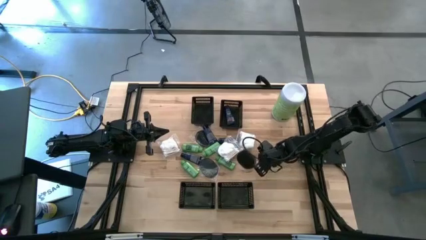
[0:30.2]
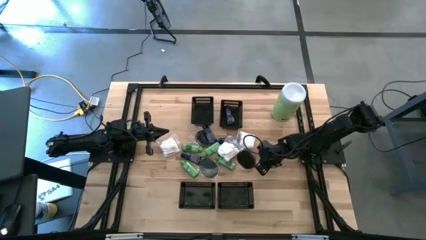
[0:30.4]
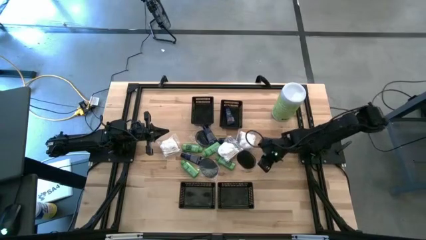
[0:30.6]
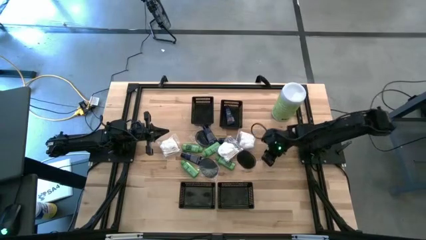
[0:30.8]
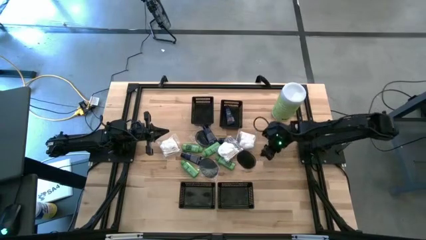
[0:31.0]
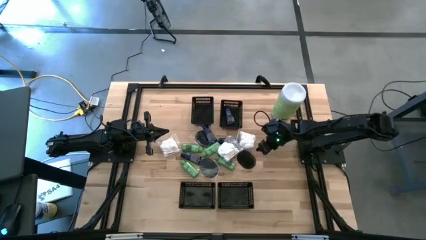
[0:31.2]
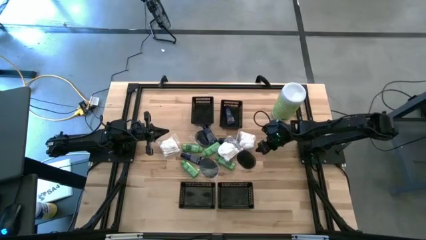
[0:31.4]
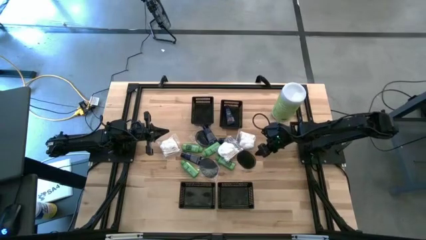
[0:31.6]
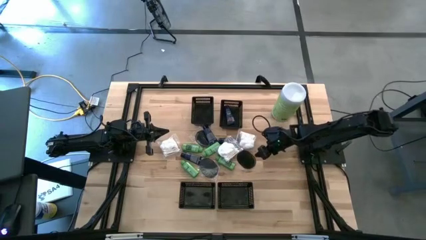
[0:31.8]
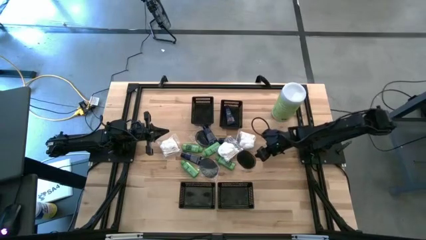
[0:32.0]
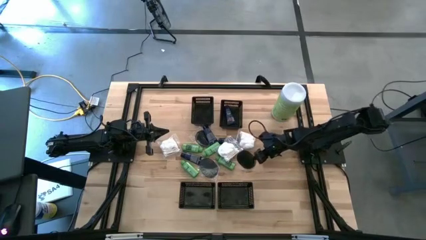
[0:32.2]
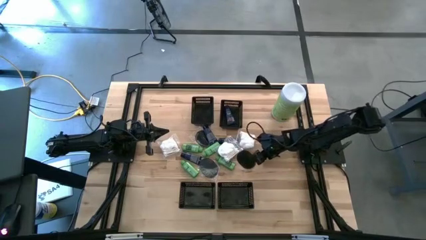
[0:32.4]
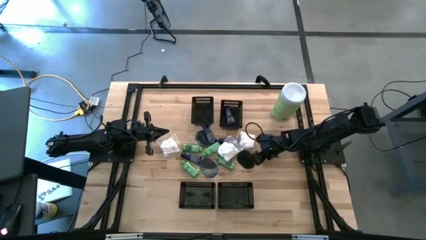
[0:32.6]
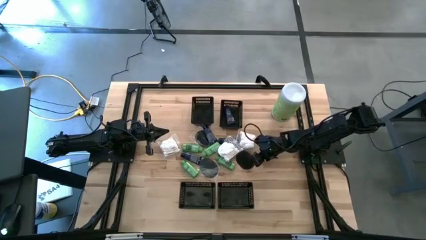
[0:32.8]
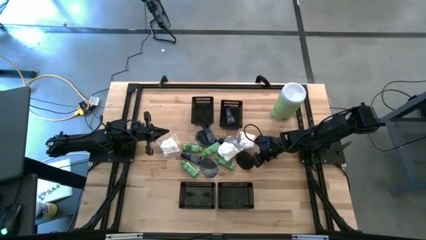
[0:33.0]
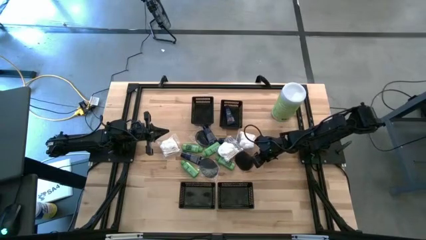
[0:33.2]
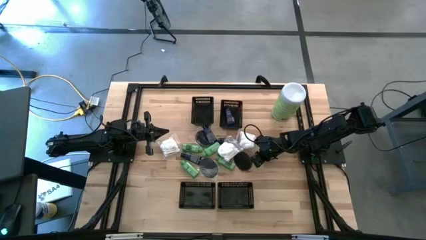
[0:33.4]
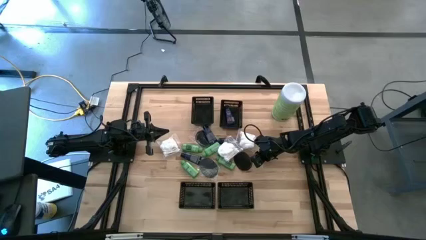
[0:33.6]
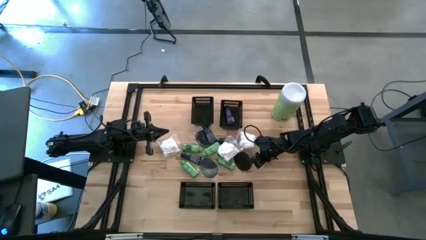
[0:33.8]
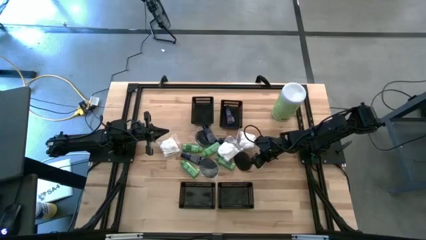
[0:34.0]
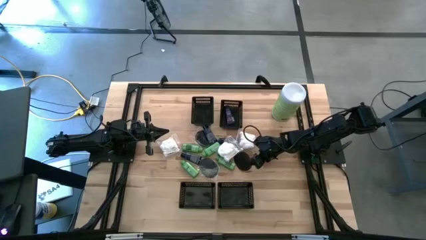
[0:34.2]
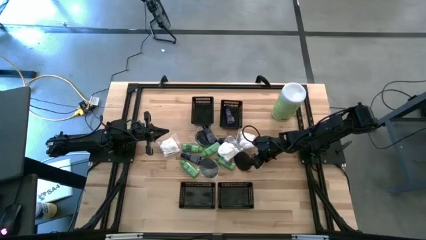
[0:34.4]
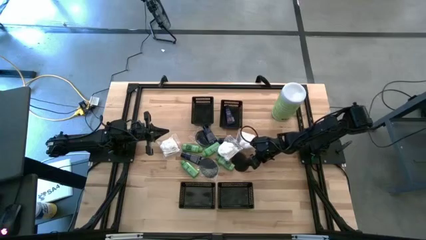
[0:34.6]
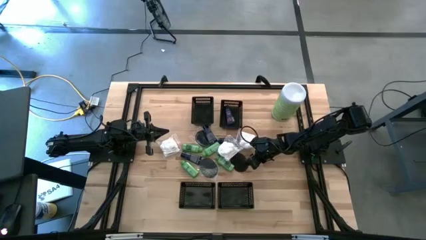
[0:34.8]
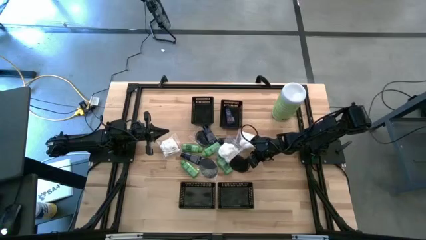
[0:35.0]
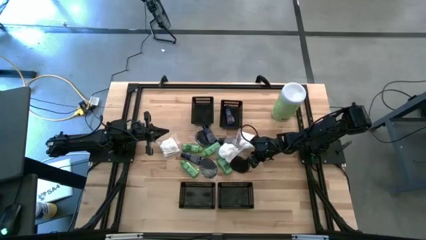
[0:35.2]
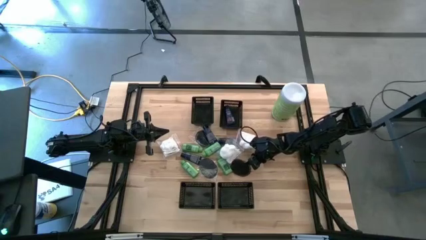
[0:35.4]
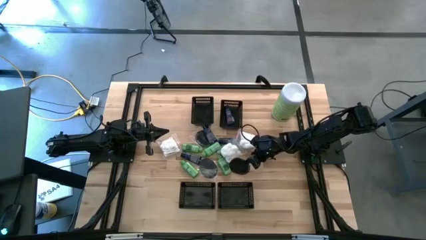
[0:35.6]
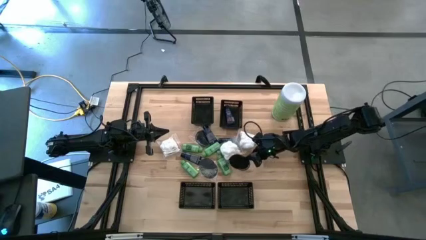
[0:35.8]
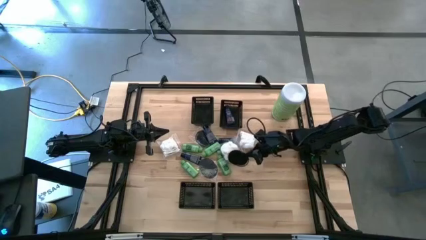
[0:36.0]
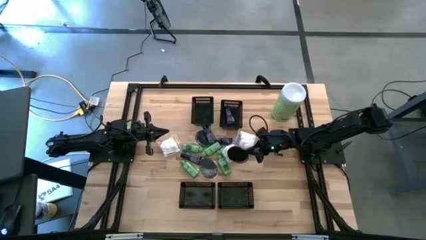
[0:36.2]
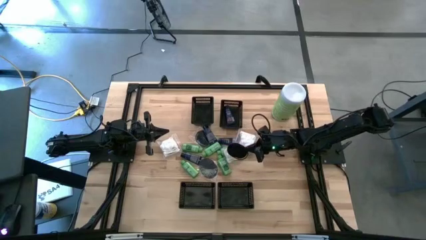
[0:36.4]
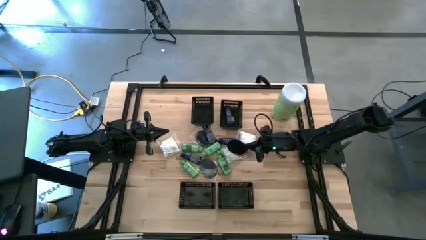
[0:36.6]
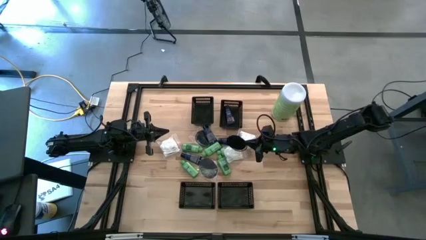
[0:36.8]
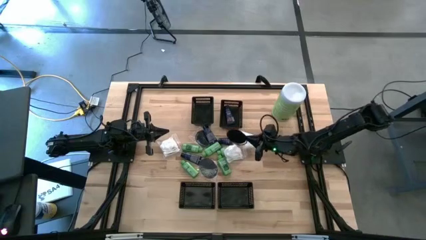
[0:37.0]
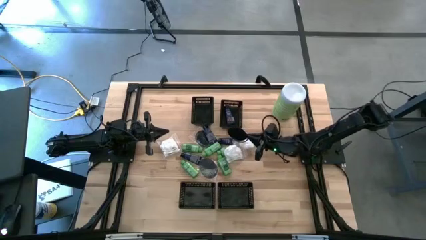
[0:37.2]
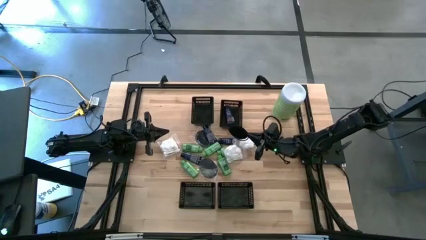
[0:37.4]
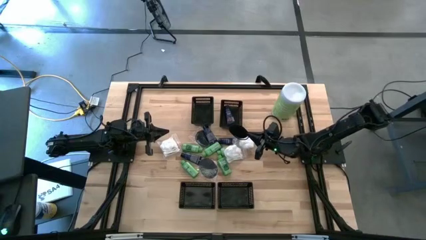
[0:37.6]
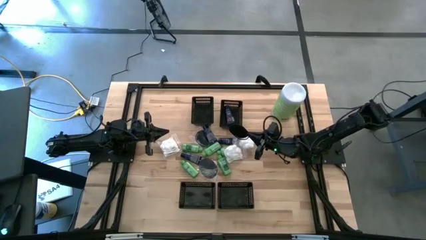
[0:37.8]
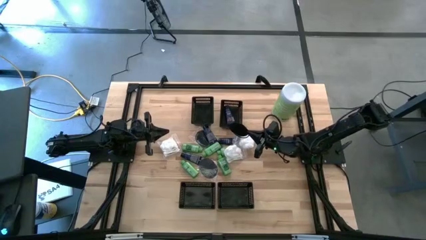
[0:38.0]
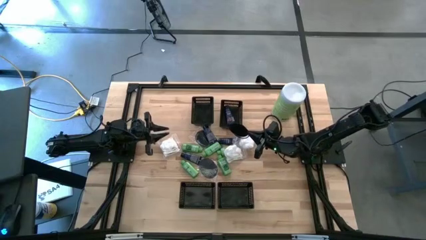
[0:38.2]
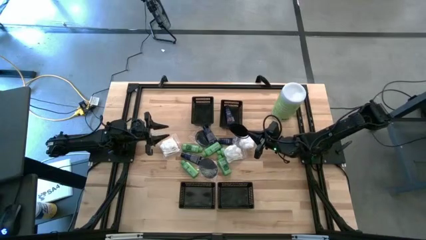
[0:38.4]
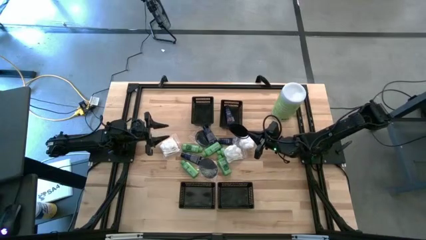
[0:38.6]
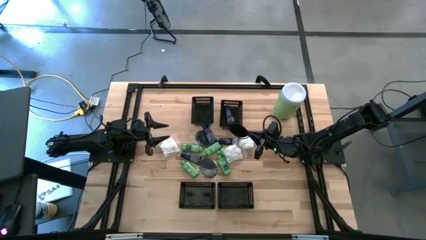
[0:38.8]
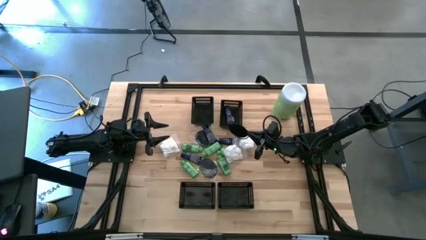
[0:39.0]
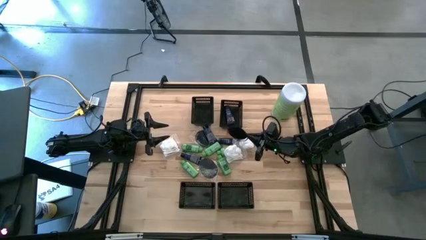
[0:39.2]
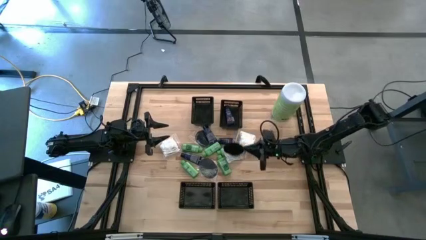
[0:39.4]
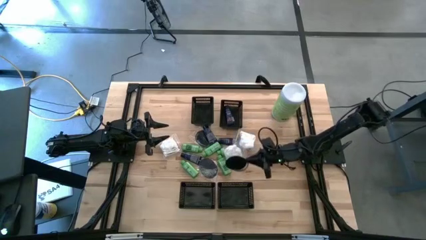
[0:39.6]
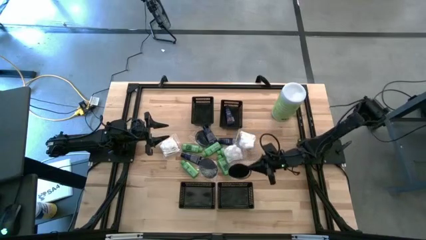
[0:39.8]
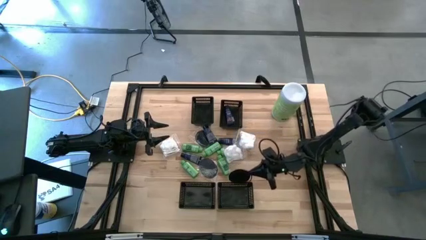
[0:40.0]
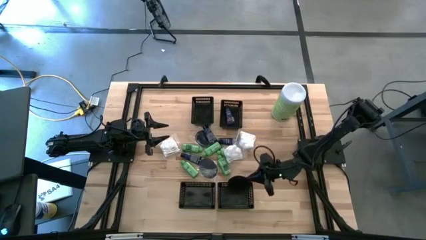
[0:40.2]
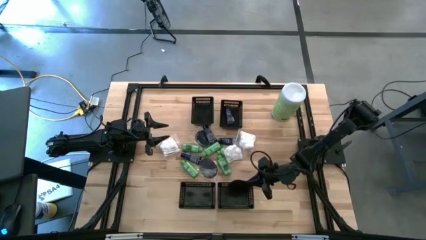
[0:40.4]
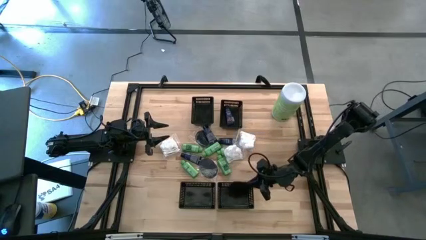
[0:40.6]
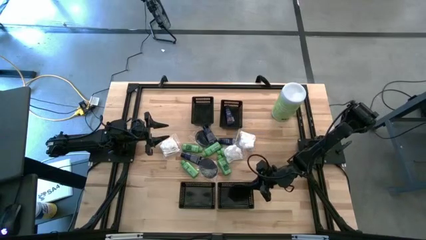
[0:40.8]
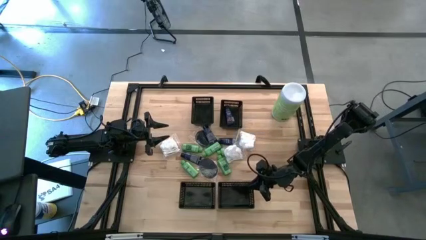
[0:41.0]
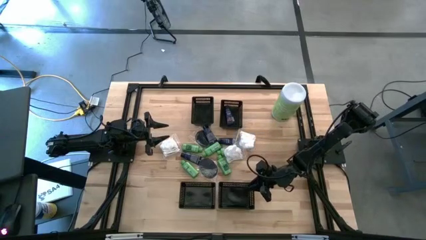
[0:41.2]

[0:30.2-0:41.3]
Task: Pick & Place Travel size toiletries
Put the black hairbrush into the bottom right black bin
